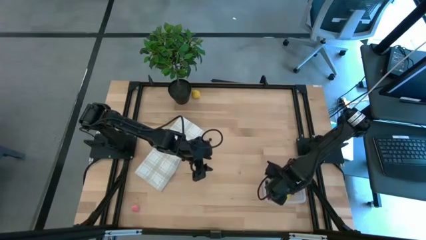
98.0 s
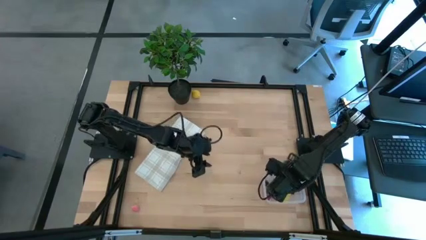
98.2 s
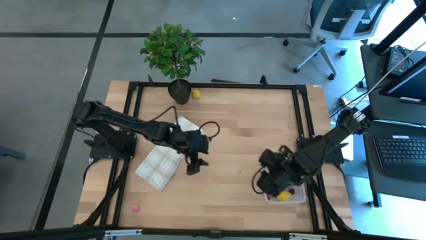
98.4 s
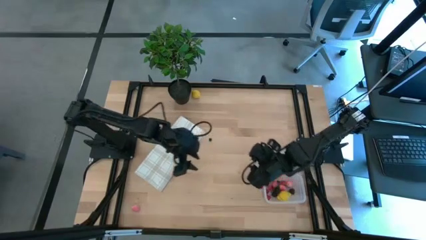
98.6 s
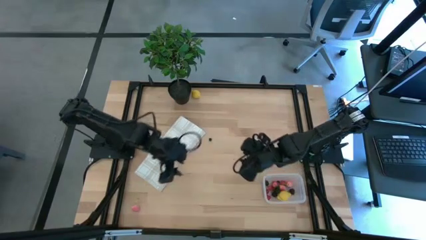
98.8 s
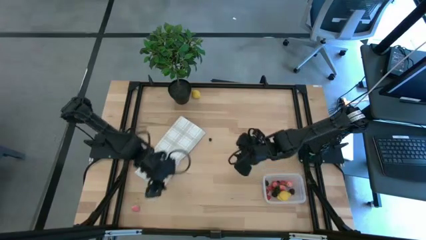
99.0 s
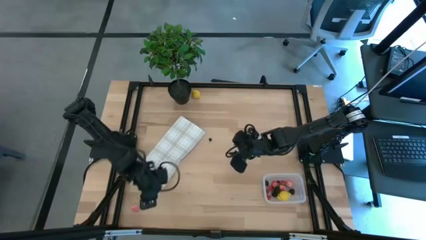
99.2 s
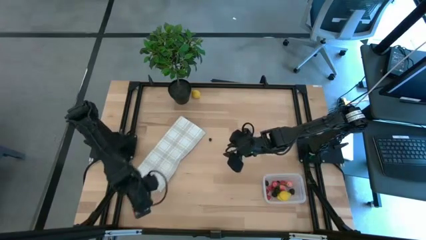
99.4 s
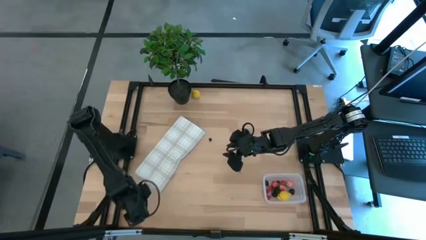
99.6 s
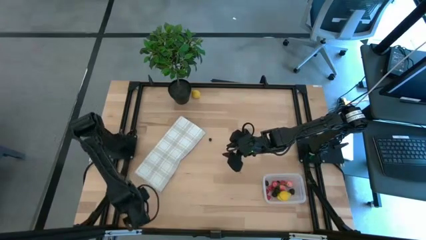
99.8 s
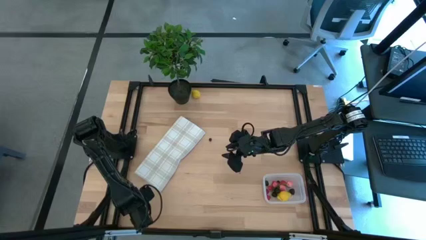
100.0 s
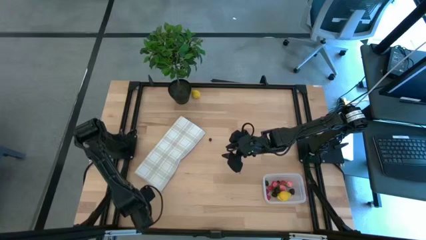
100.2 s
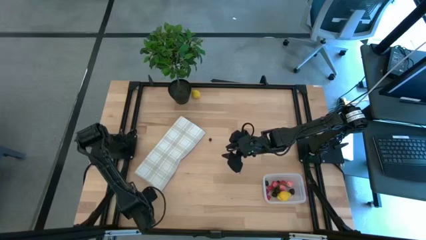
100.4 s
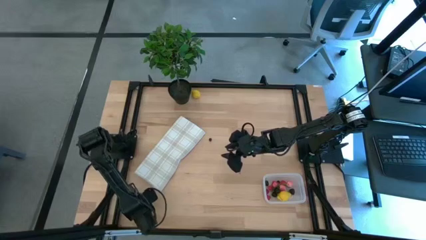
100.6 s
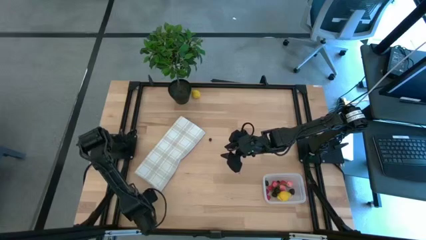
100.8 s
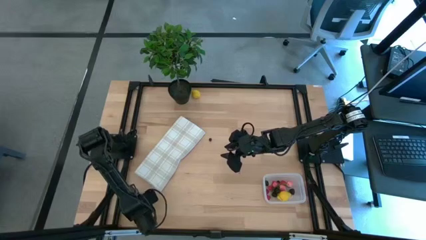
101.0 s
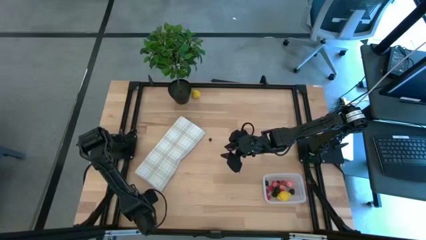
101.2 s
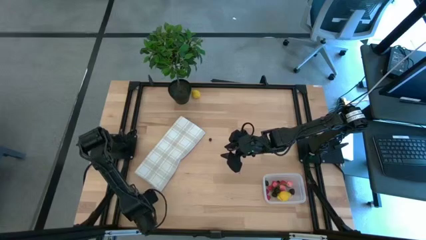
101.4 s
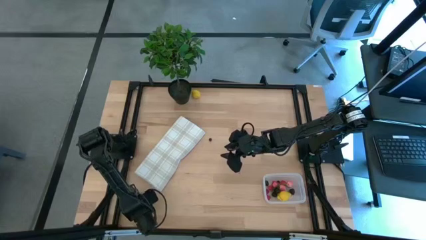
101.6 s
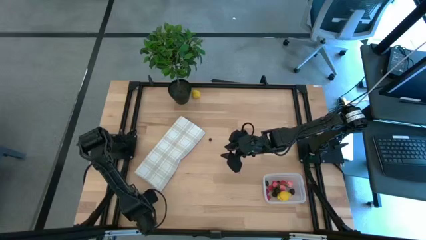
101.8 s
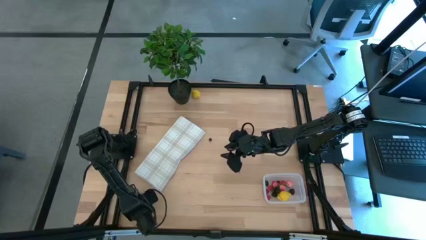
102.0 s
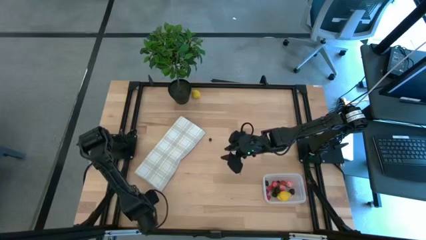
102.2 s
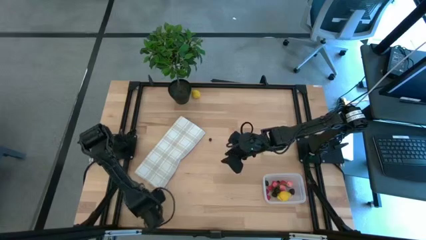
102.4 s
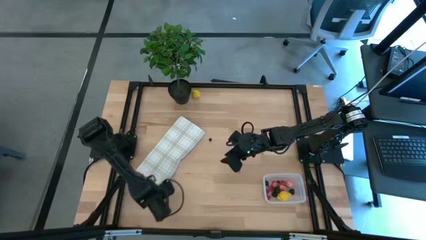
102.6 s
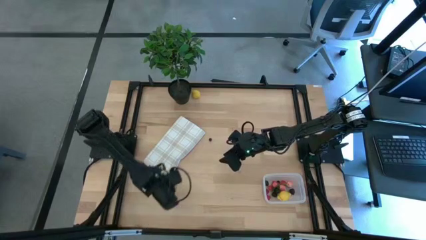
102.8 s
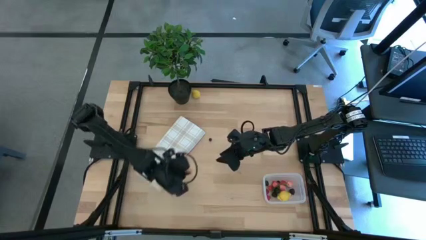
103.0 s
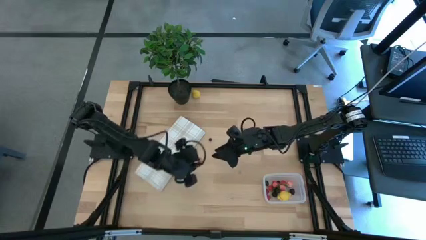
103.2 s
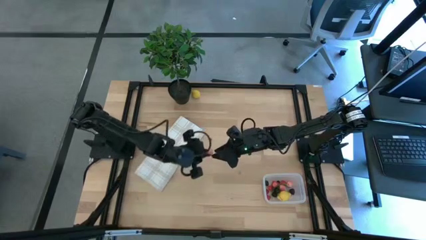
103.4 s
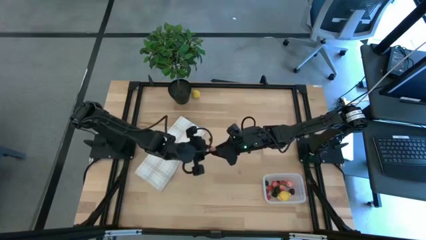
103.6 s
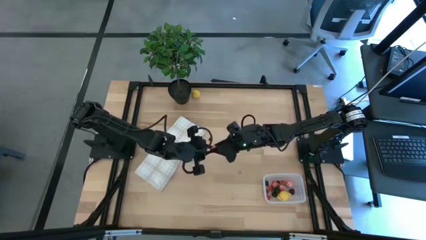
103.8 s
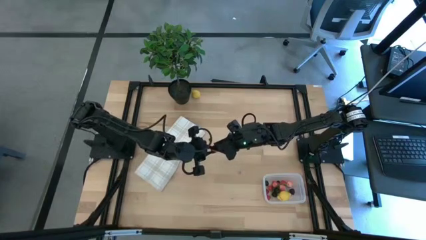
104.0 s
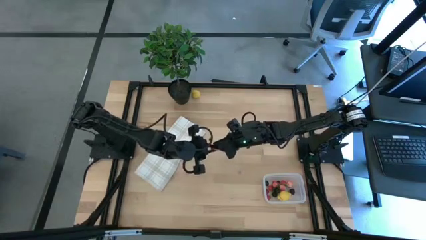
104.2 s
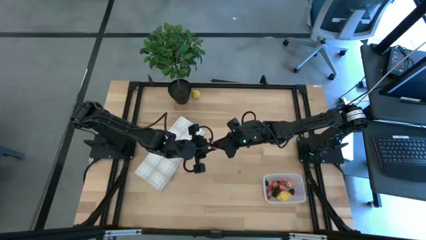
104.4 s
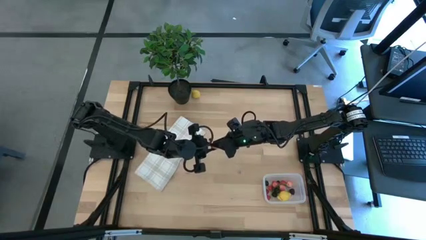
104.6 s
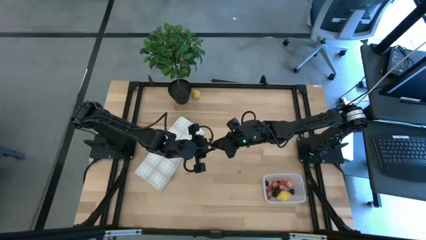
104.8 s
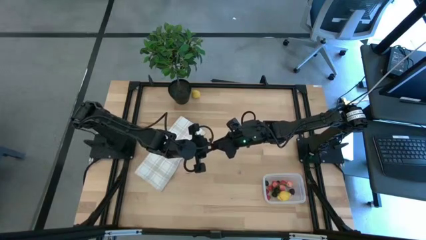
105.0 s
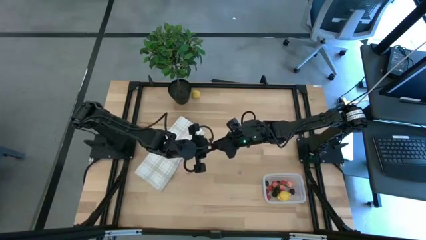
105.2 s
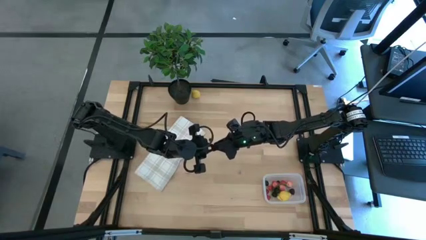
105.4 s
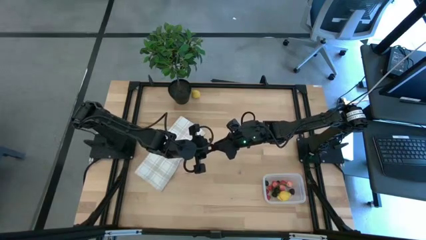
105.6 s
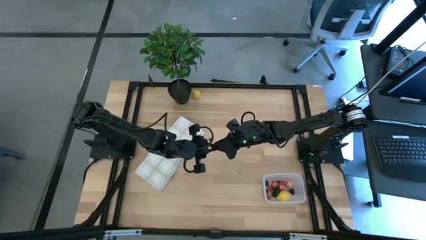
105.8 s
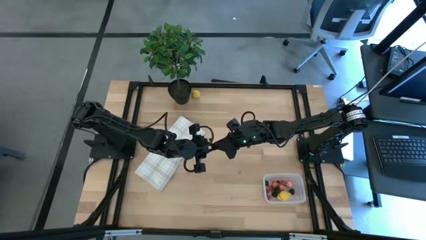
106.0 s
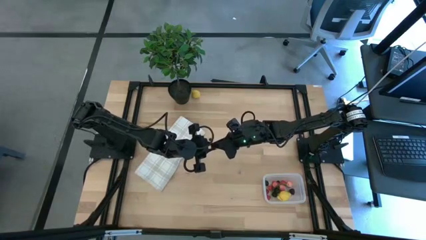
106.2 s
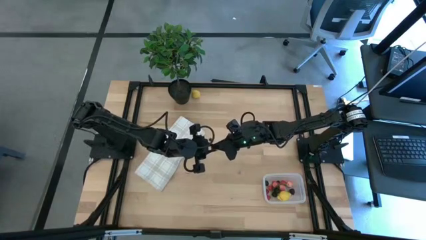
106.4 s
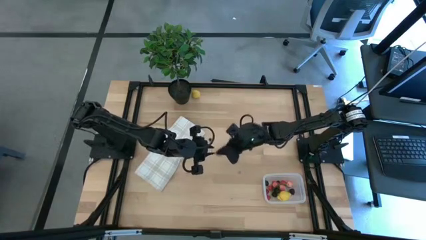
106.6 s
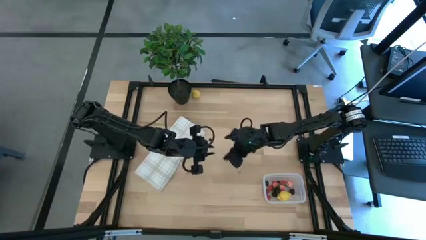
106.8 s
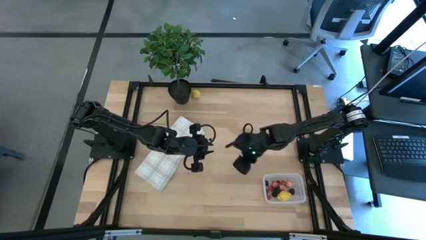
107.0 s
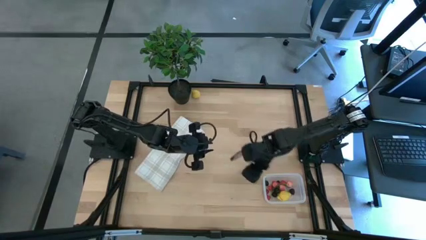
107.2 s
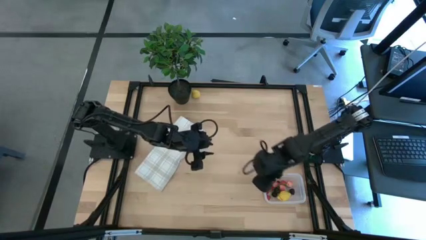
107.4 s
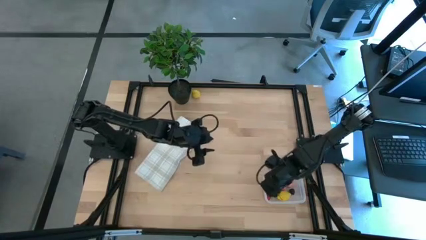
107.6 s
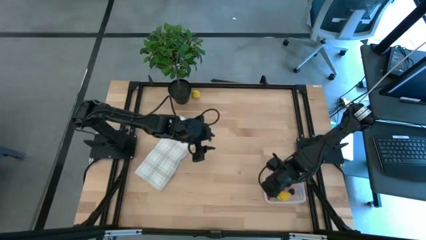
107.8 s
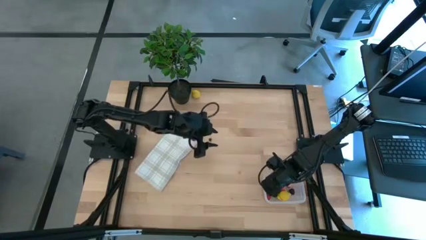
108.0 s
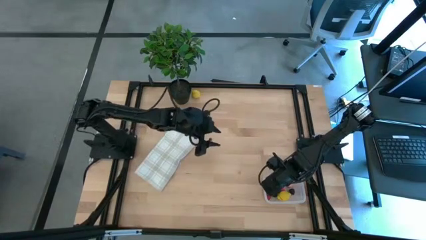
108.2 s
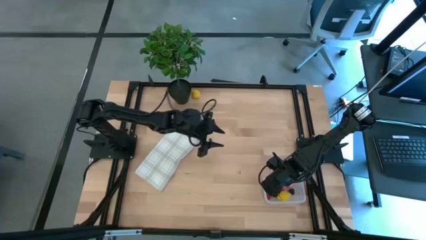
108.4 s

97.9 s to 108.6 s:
Task: Pick and placing Produce into tupperware
Put the pink peach into the transparent bin

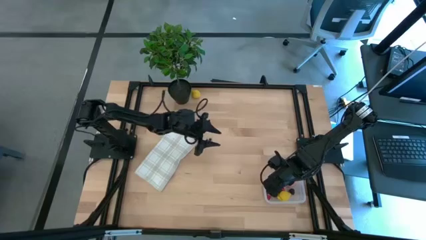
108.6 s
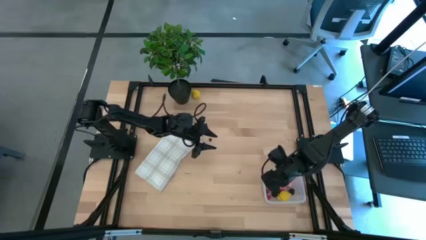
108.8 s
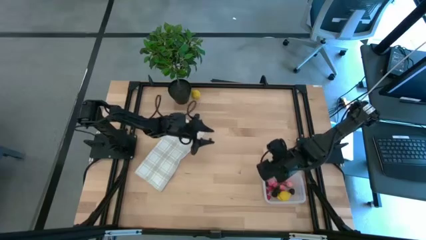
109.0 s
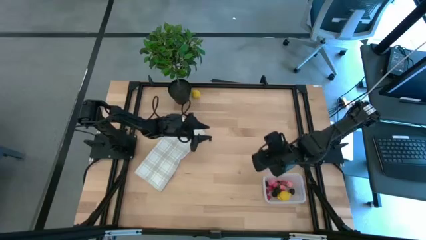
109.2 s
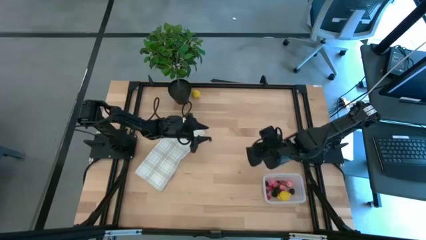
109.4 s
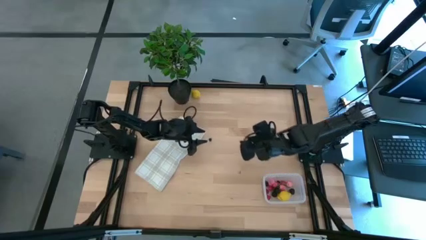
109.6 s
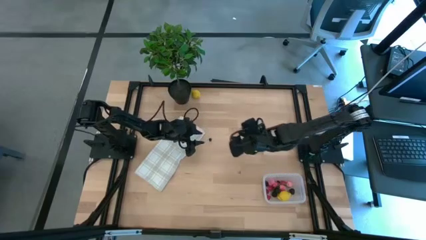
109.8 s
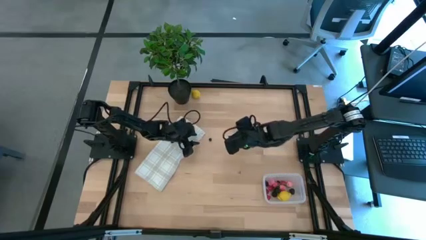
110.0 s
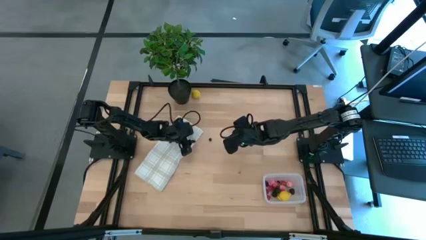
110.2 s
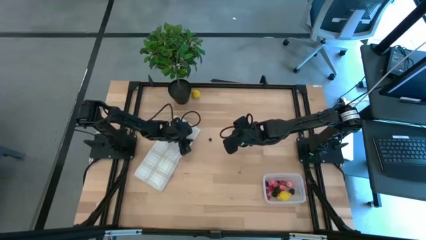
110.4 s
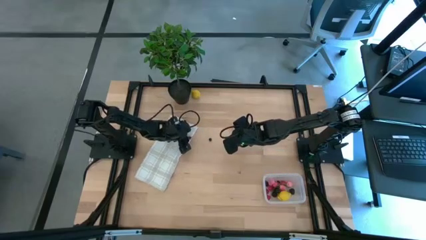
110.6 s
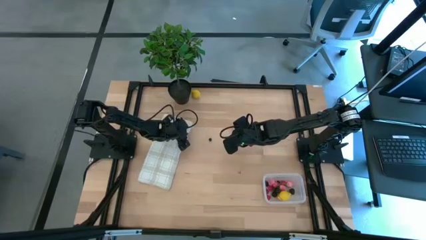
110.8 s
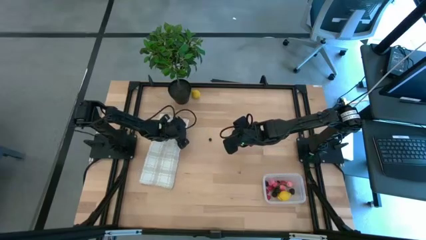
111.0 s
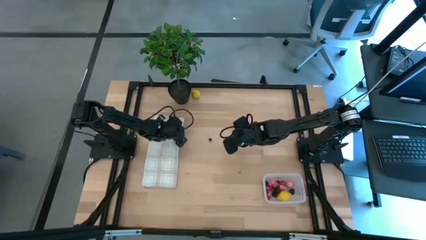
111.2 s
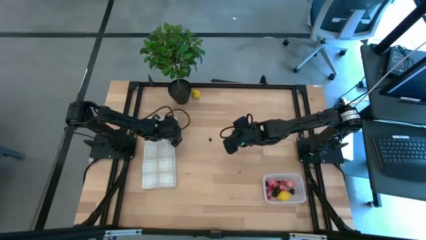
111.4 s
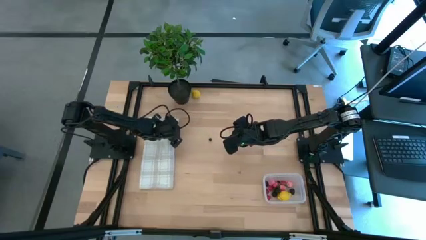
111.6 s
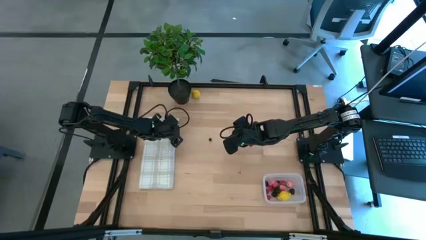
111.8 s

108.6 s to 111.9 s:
Adjust the patterned white towel
